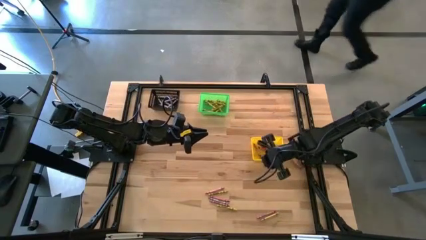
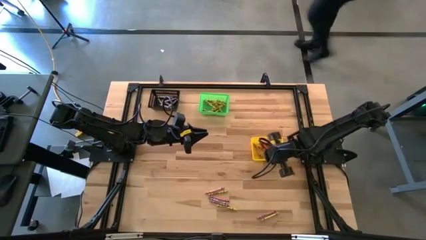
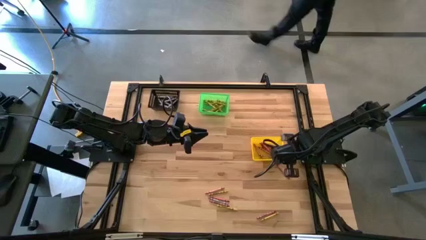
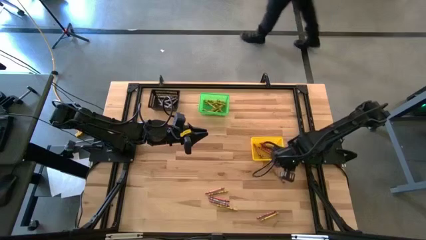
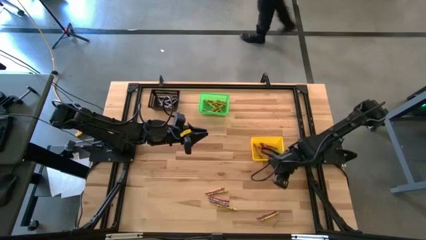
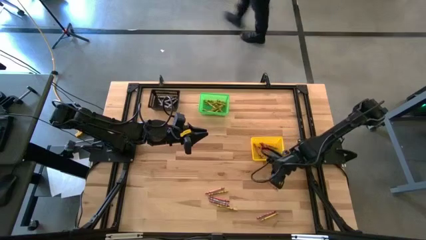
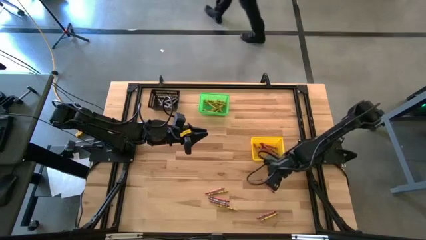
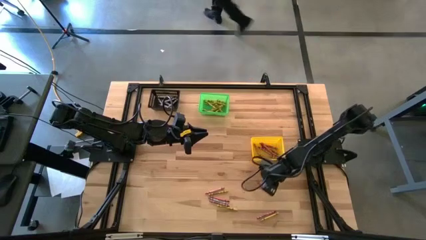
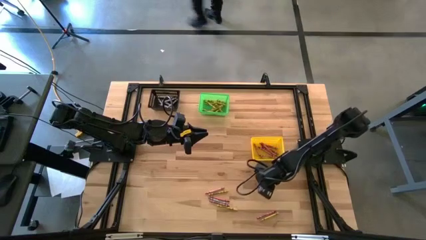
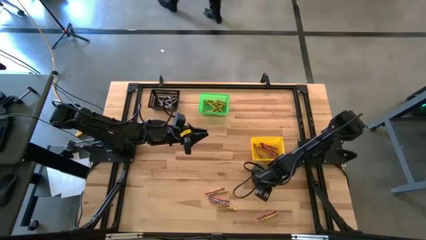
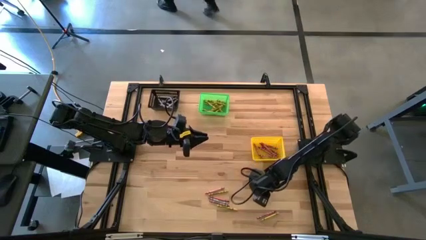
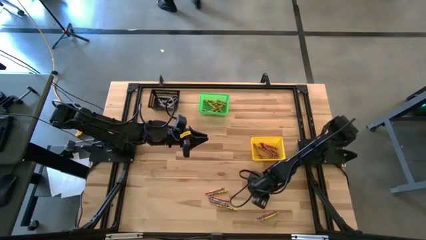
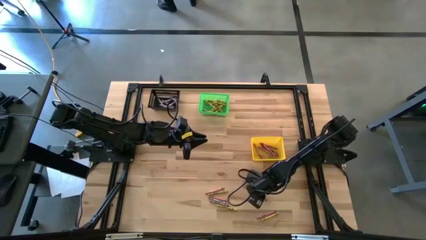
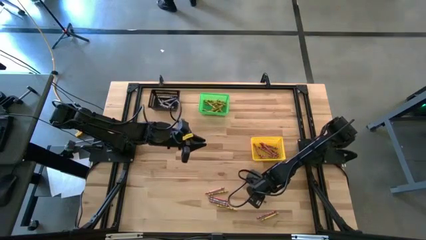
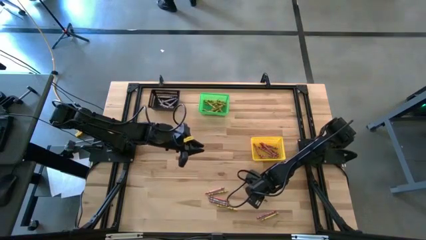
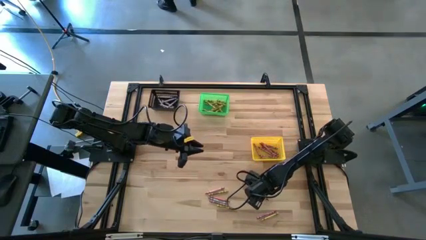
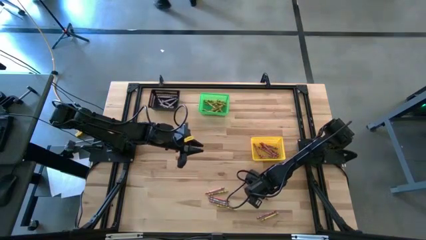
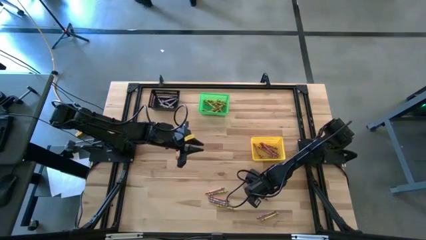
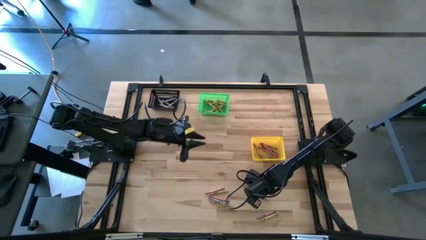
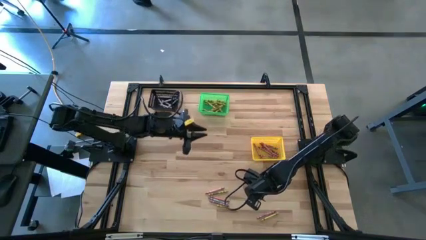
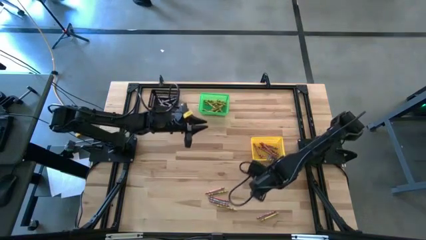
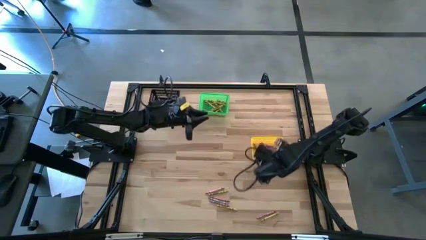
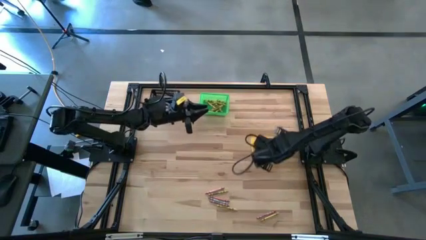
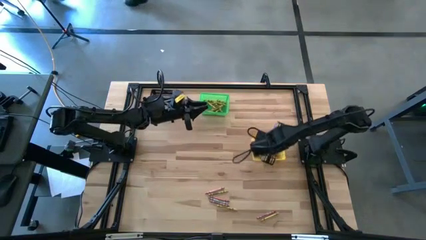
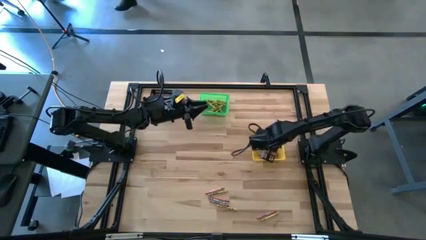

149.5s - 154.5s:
Task: Sort crayons
Put the red crayon into the yellow basket

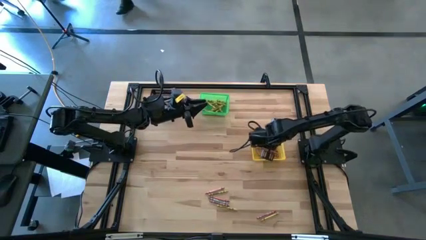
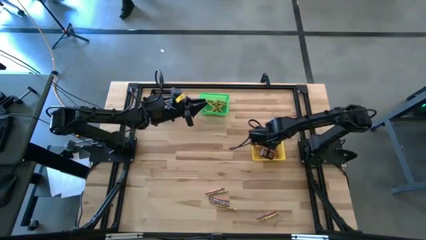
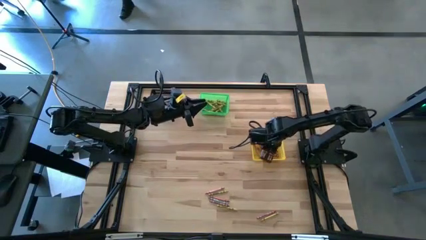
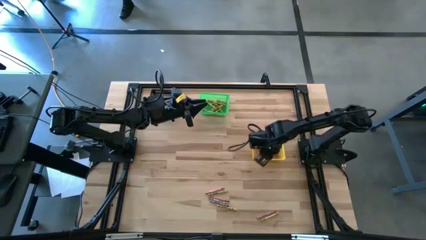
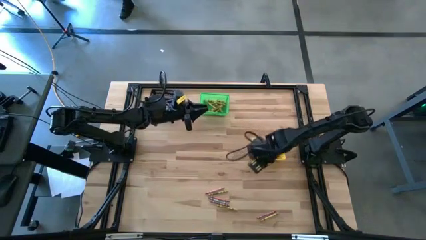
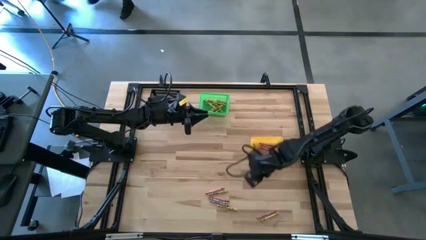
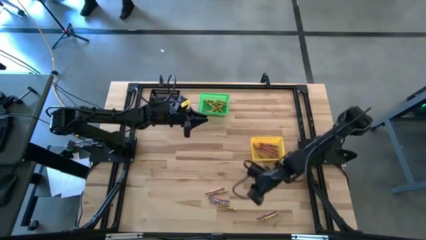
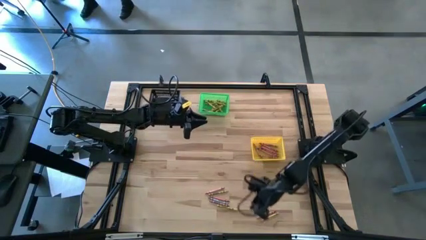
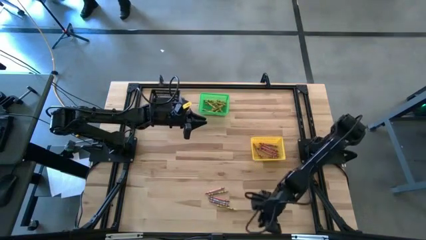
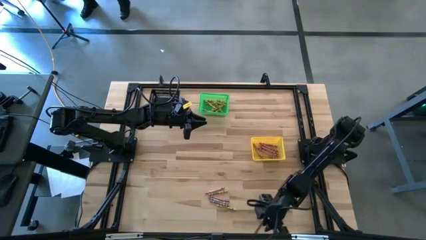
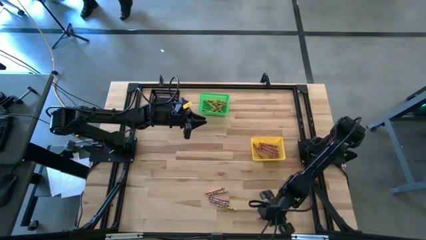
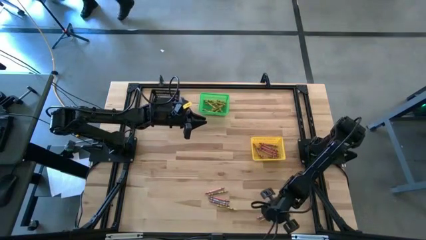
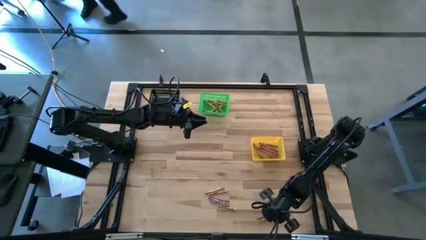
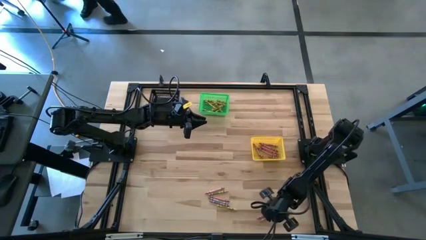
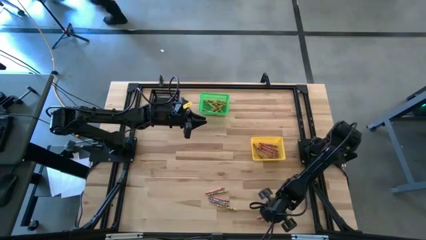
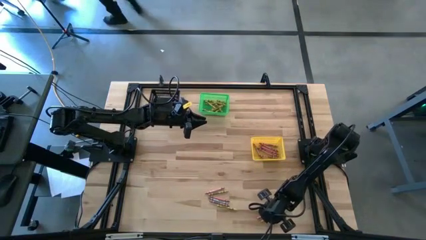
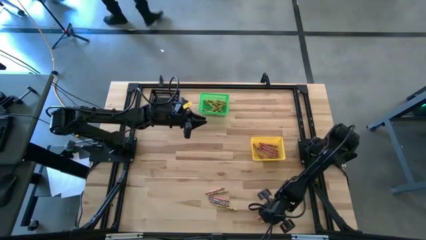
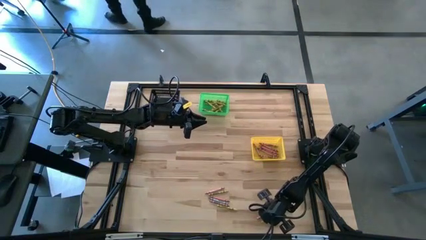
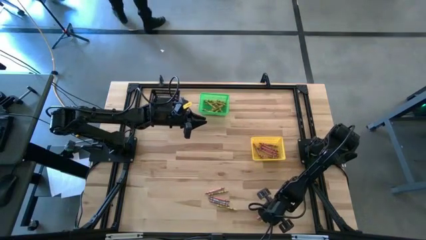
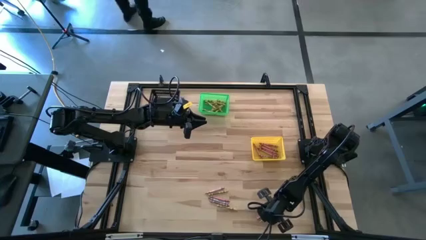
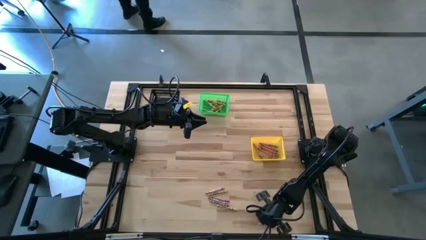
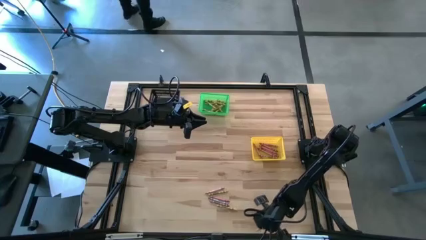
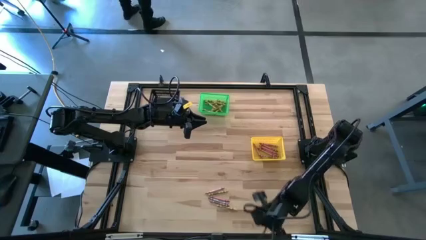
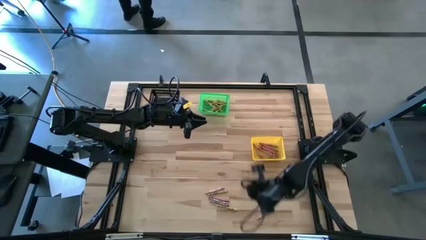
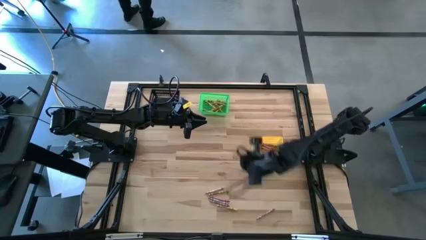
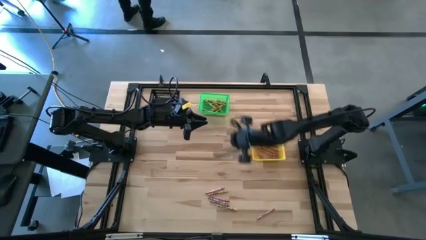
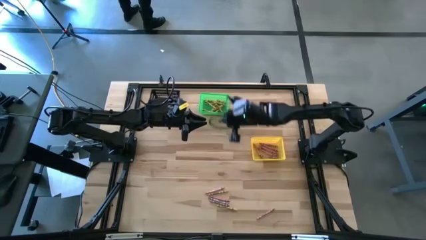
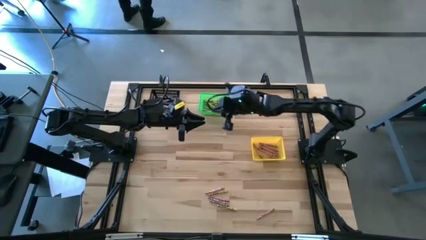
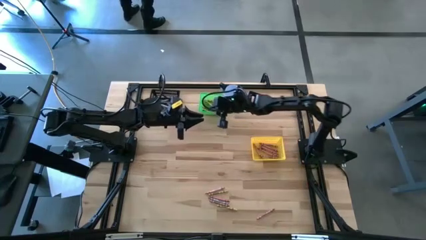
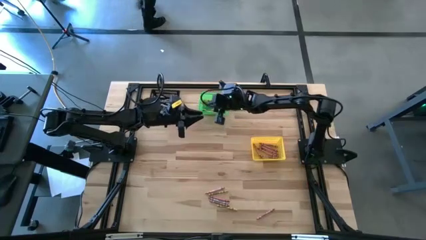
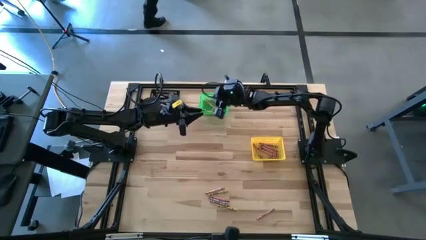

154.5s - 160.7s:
Put the yellow crayon into the green basket

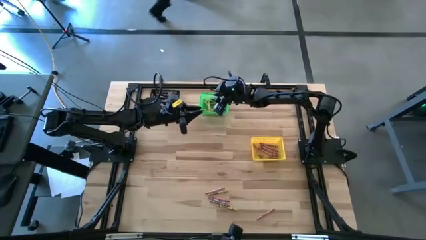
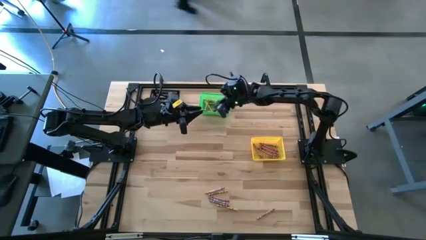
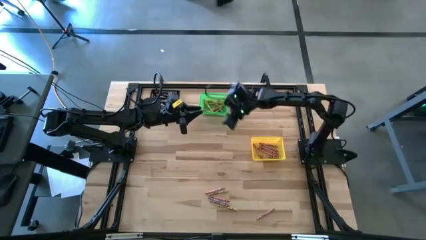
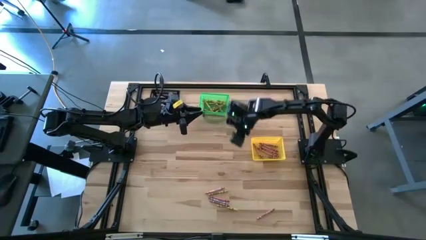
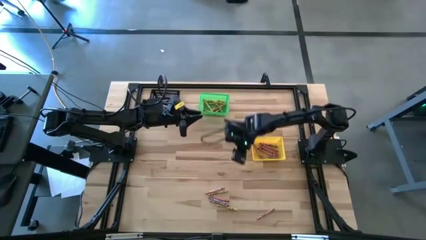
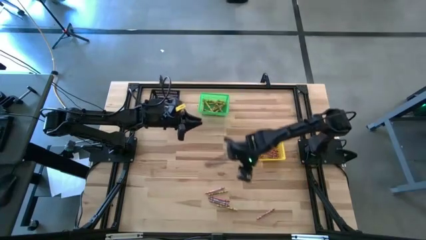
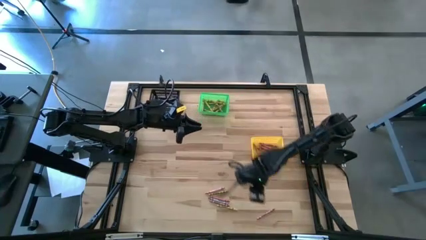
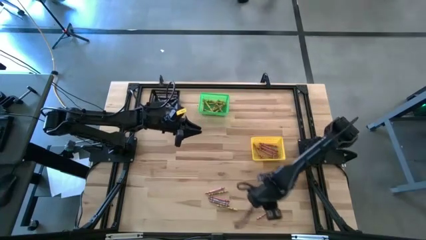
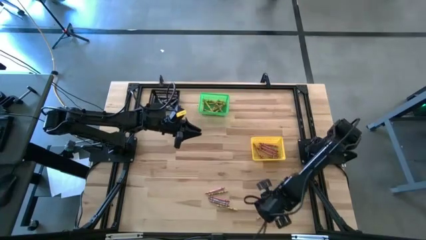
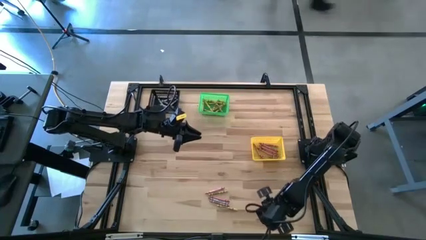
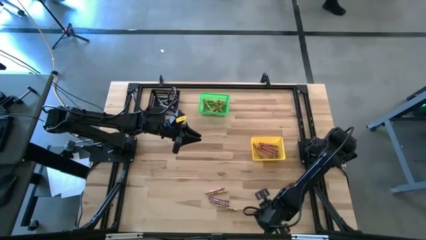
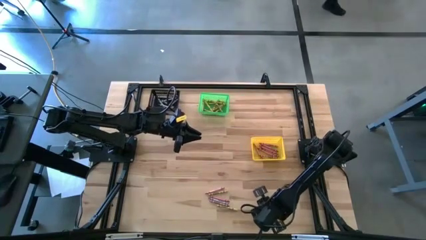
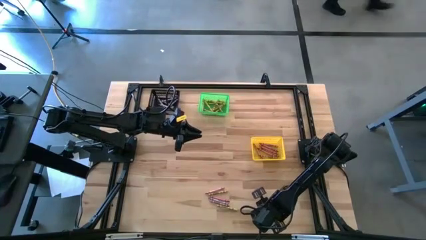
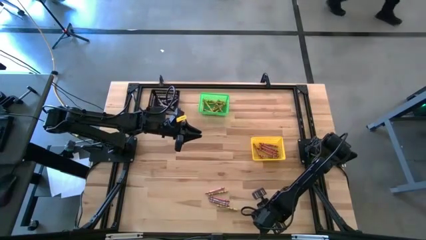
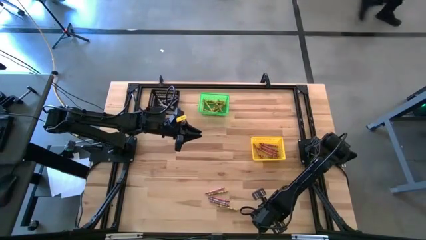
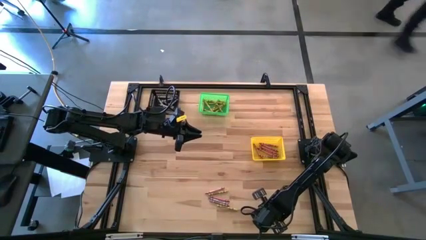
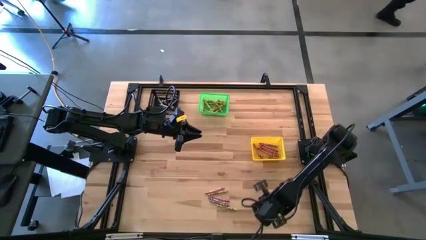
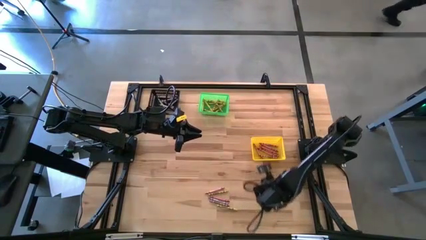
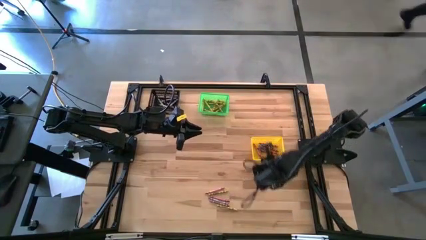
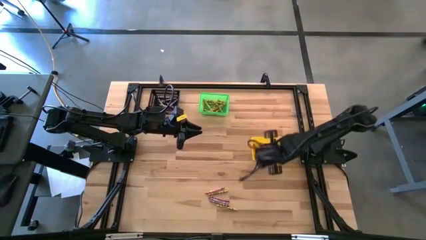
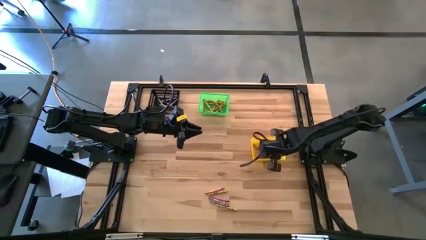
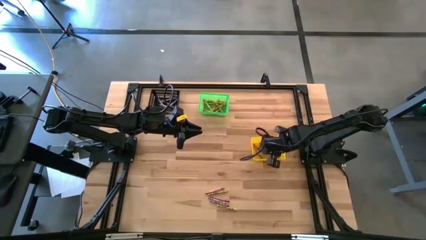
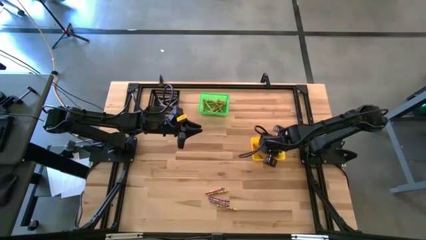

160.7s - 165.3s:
Put the red crayon into the yellow basket

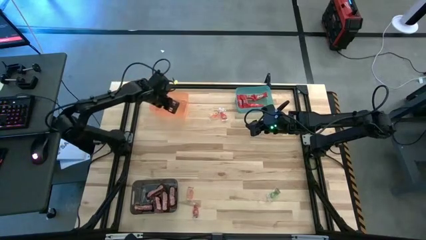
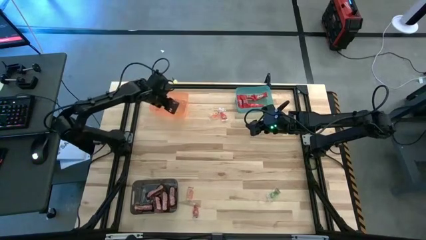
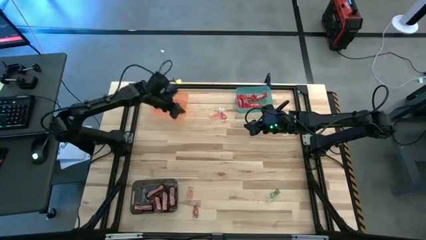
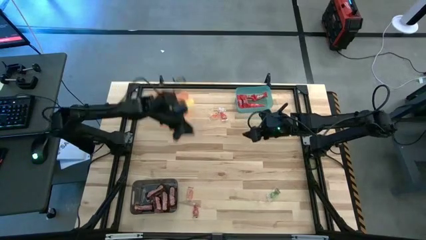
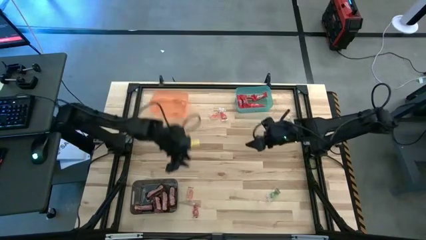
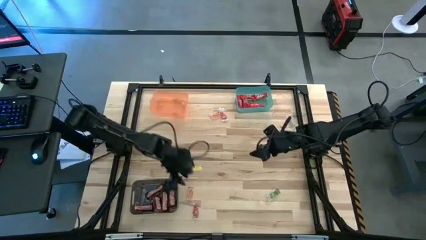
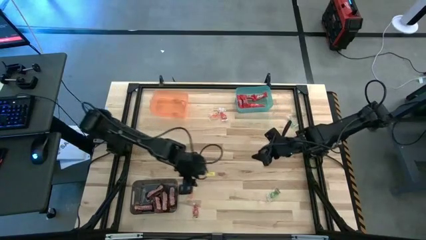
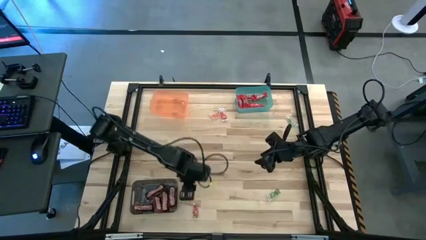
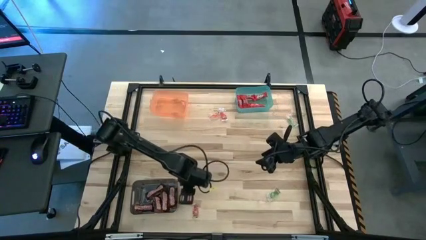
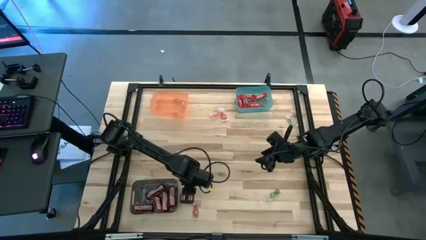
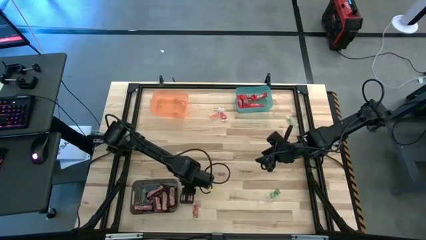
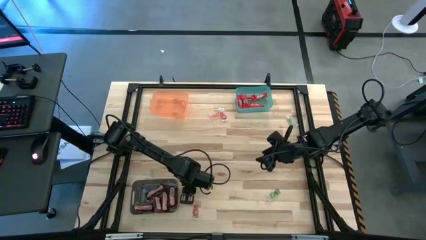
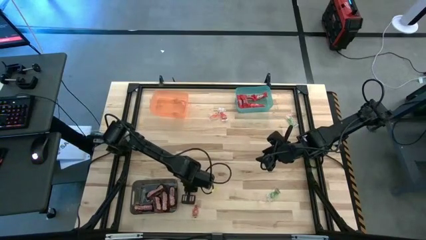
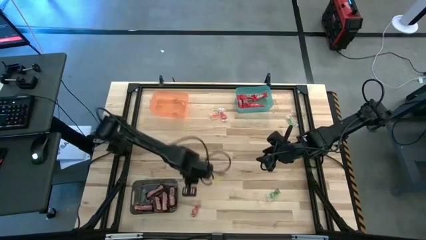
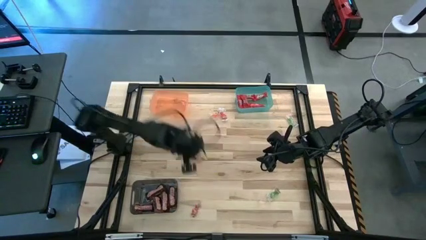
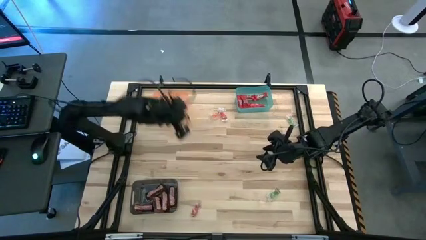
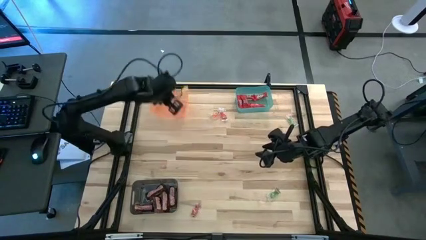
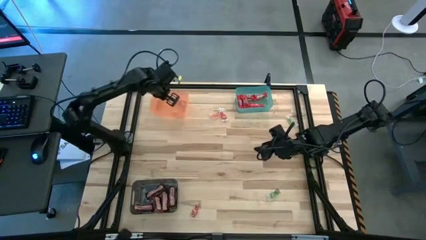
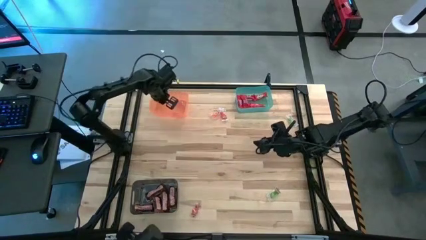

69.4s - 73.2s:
Task: Sort candy by brand, put in halloween buckets
Put the orange gummy into the orange bin
